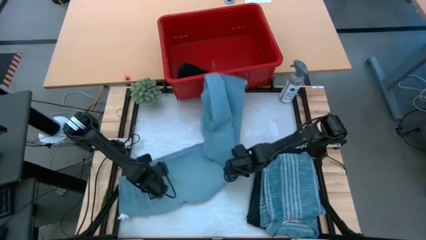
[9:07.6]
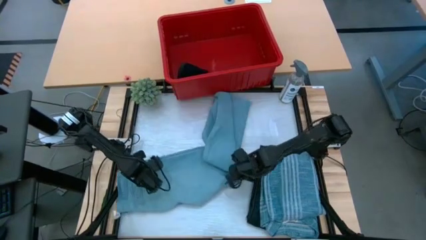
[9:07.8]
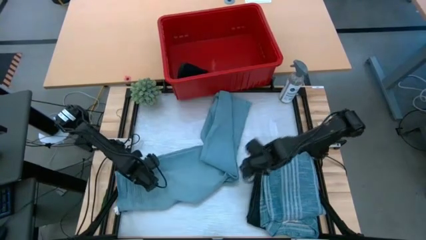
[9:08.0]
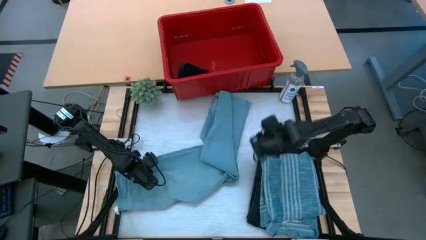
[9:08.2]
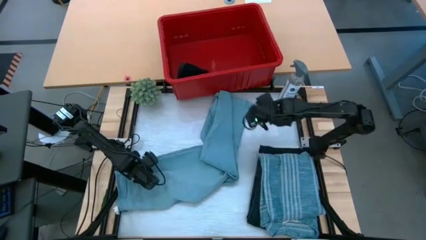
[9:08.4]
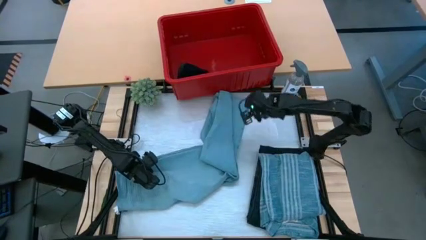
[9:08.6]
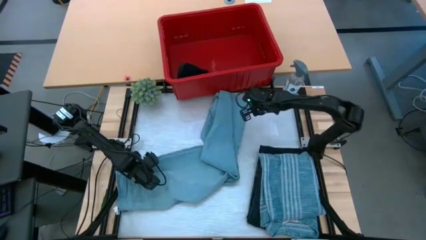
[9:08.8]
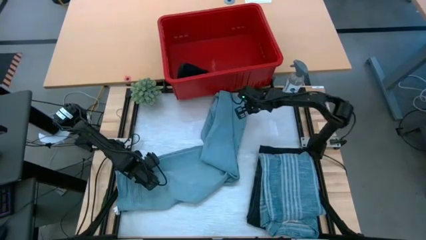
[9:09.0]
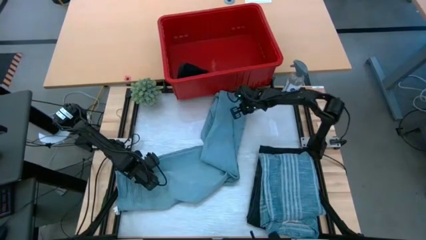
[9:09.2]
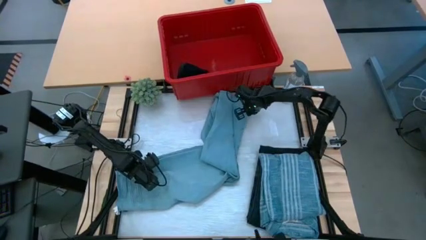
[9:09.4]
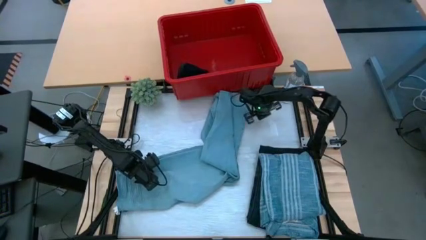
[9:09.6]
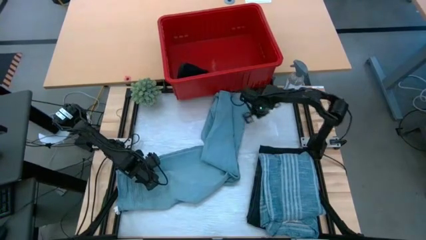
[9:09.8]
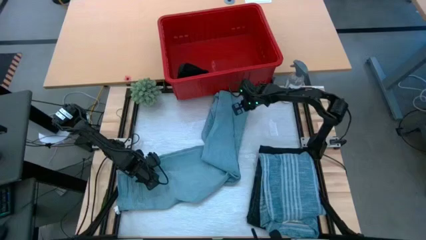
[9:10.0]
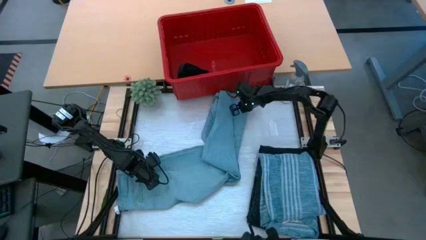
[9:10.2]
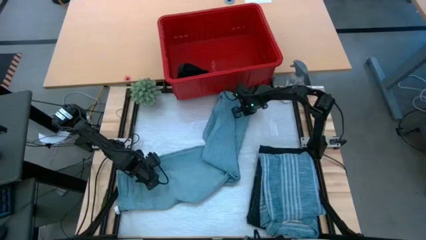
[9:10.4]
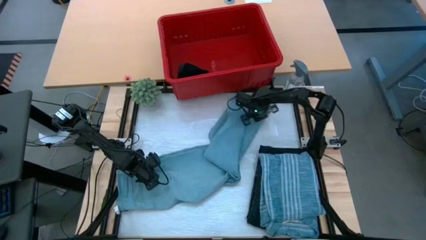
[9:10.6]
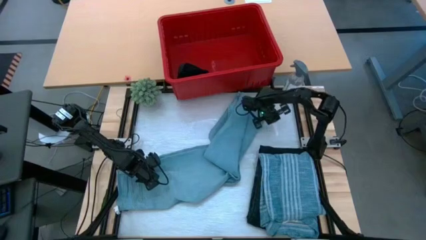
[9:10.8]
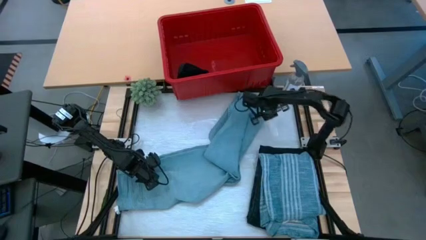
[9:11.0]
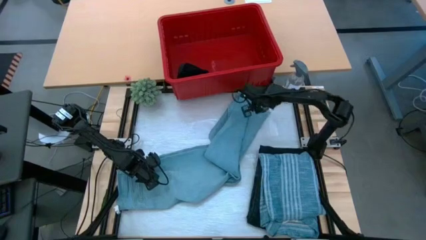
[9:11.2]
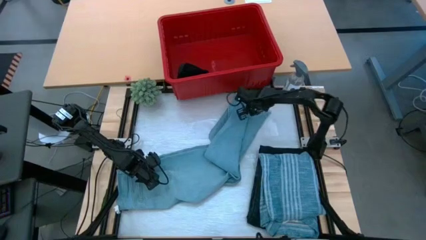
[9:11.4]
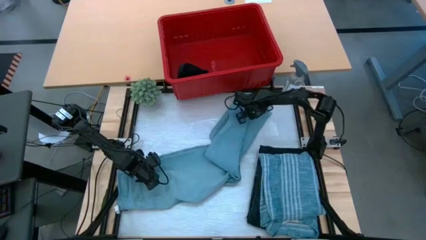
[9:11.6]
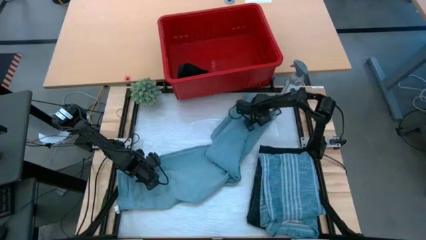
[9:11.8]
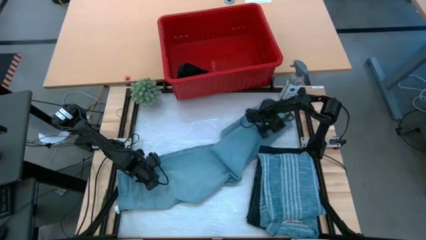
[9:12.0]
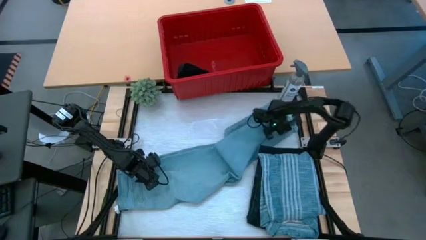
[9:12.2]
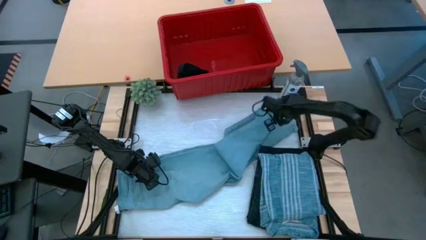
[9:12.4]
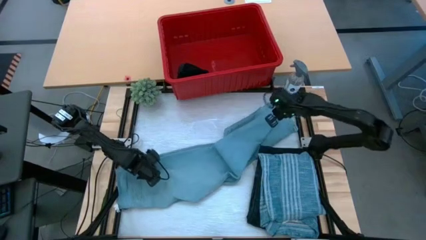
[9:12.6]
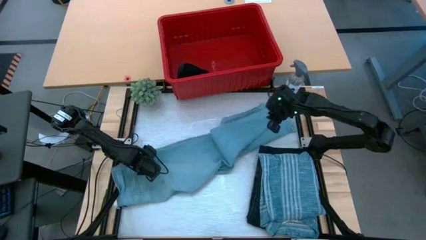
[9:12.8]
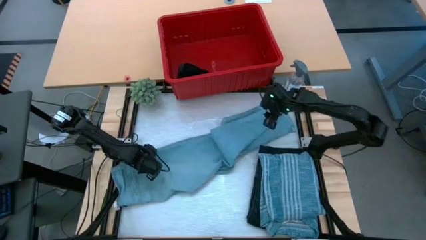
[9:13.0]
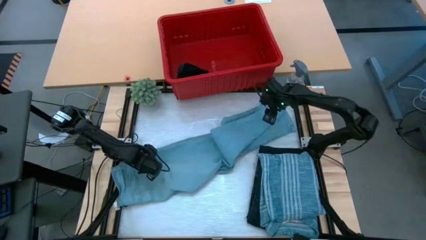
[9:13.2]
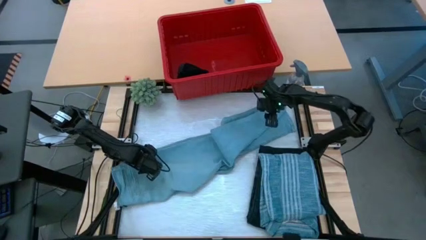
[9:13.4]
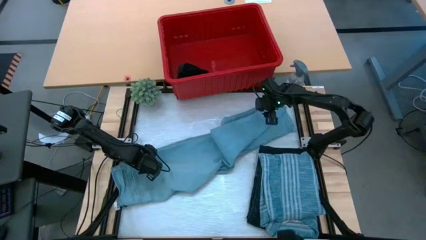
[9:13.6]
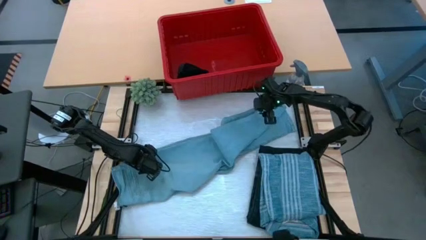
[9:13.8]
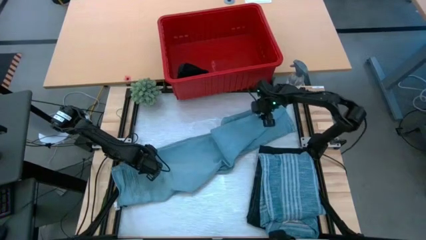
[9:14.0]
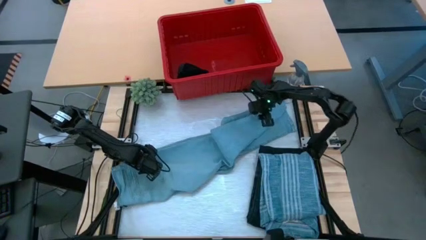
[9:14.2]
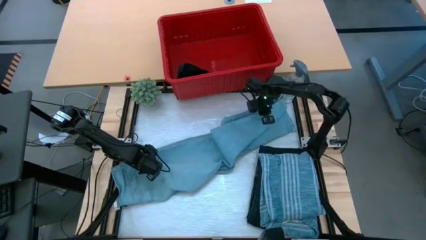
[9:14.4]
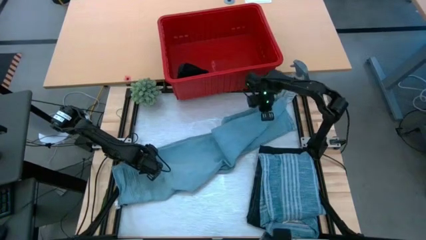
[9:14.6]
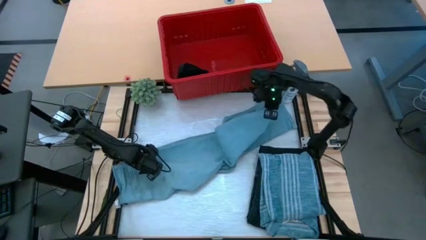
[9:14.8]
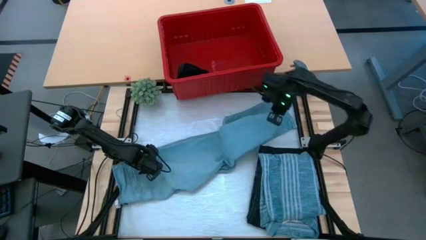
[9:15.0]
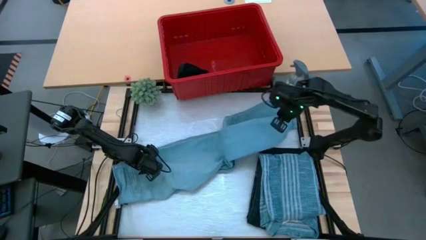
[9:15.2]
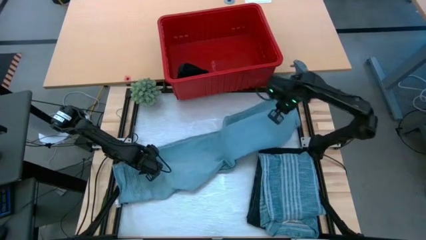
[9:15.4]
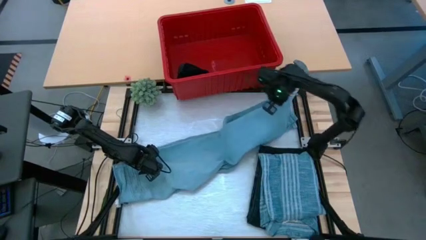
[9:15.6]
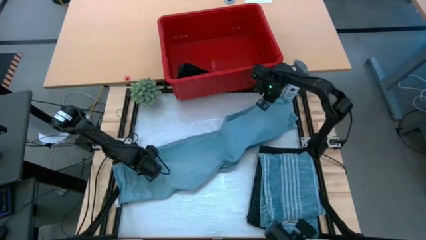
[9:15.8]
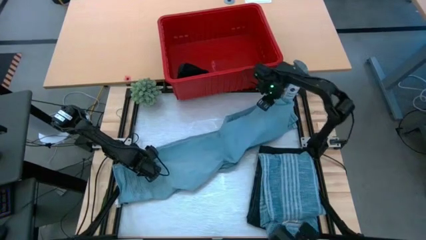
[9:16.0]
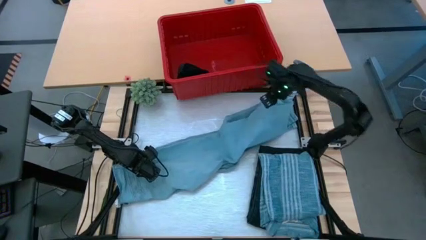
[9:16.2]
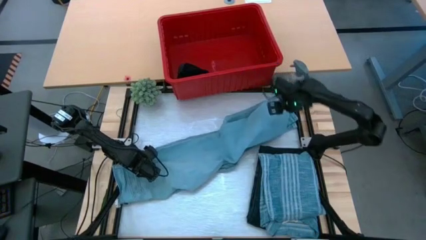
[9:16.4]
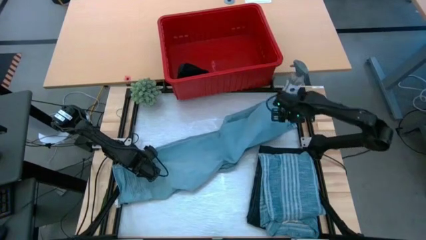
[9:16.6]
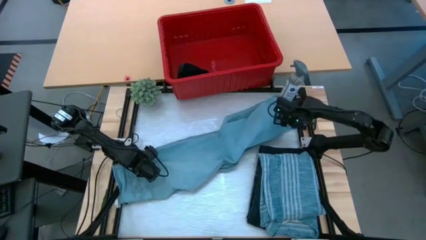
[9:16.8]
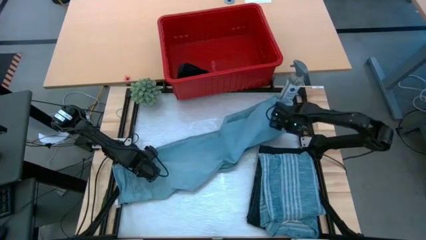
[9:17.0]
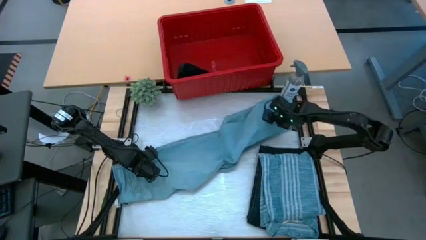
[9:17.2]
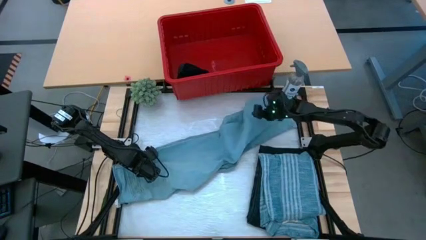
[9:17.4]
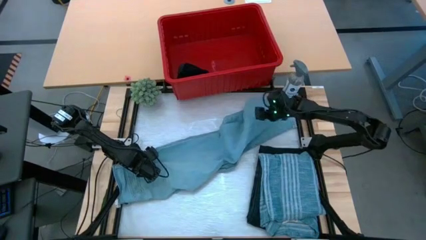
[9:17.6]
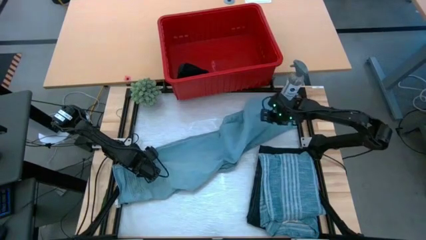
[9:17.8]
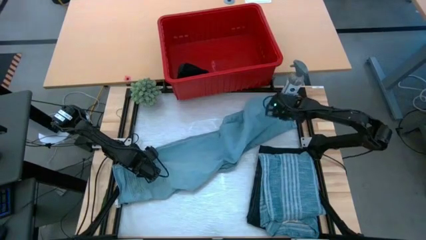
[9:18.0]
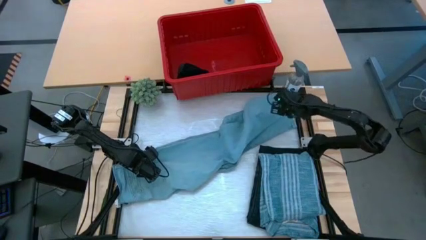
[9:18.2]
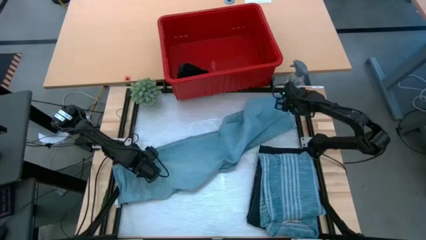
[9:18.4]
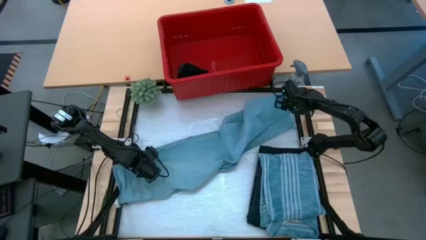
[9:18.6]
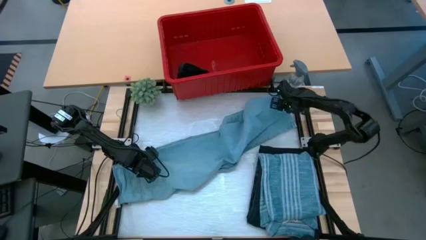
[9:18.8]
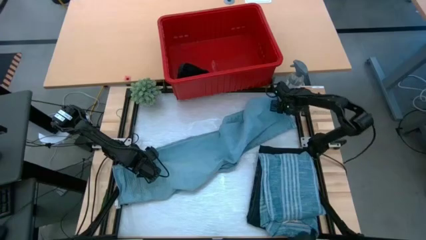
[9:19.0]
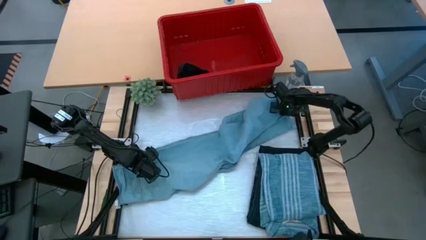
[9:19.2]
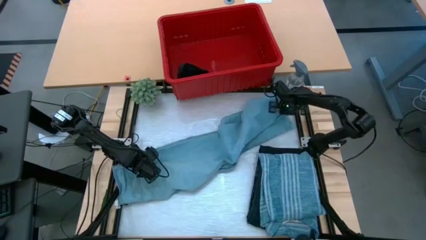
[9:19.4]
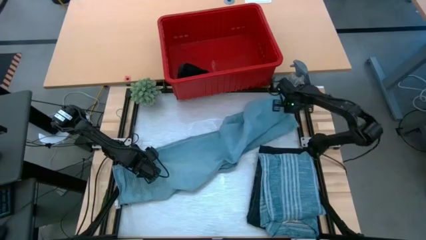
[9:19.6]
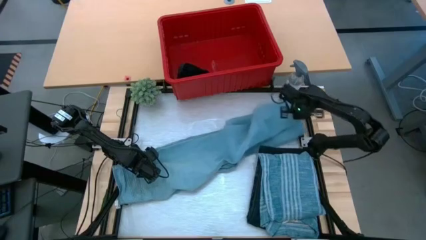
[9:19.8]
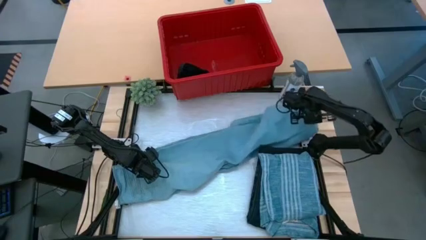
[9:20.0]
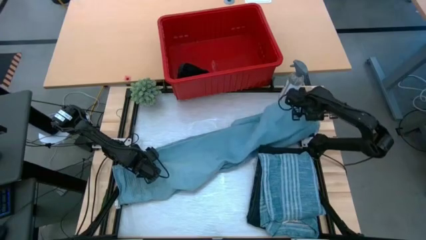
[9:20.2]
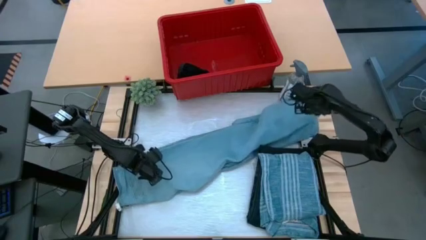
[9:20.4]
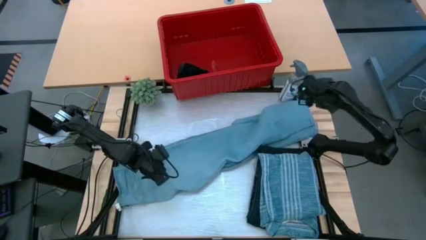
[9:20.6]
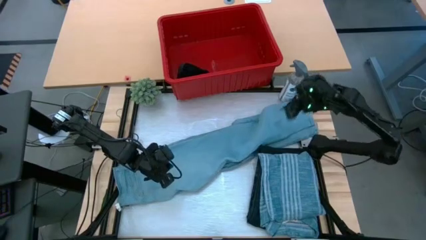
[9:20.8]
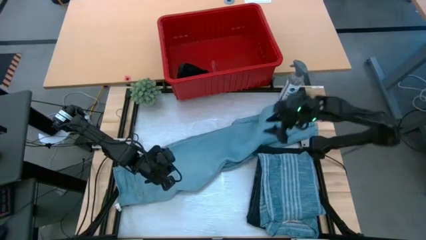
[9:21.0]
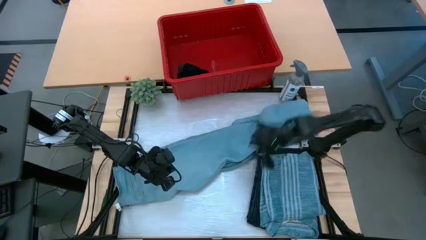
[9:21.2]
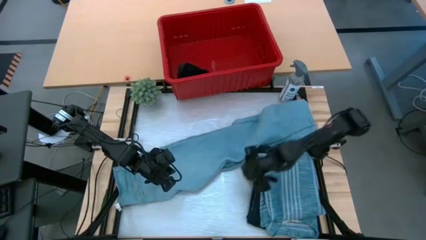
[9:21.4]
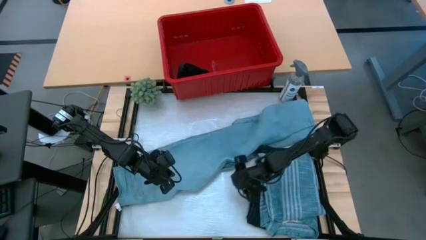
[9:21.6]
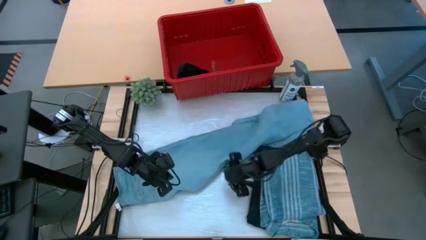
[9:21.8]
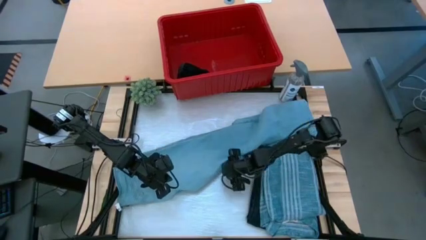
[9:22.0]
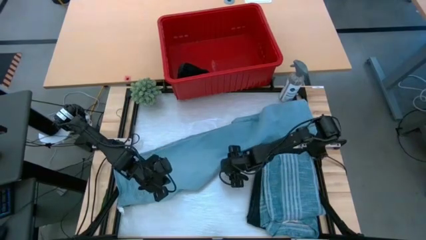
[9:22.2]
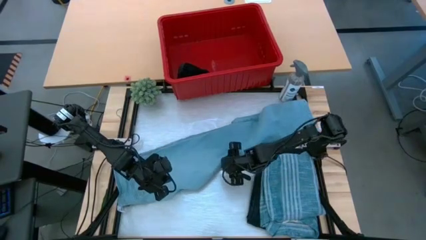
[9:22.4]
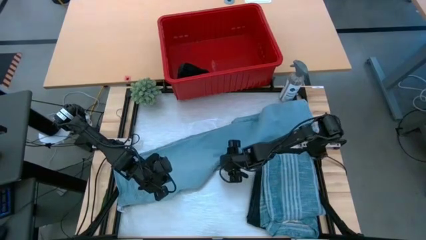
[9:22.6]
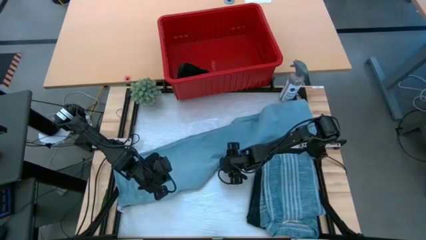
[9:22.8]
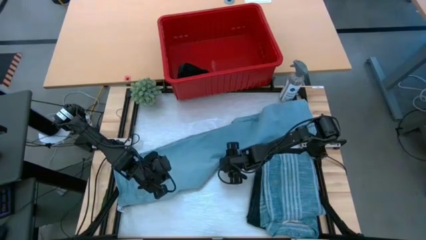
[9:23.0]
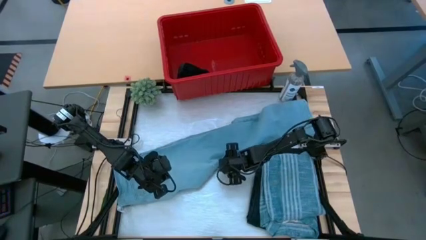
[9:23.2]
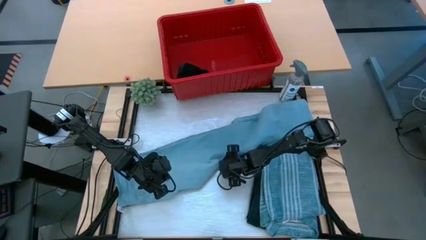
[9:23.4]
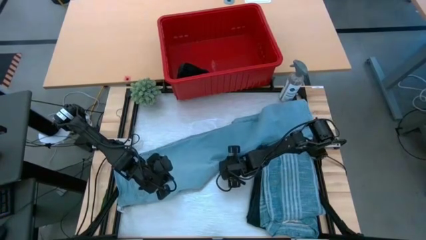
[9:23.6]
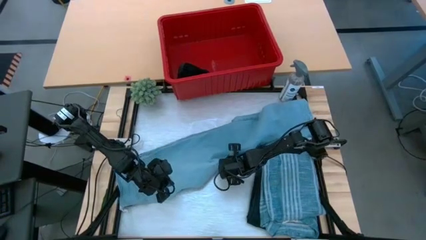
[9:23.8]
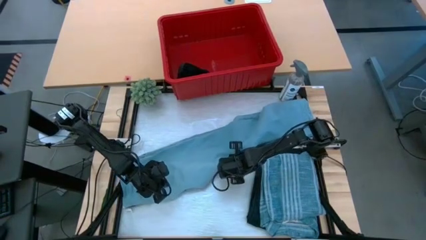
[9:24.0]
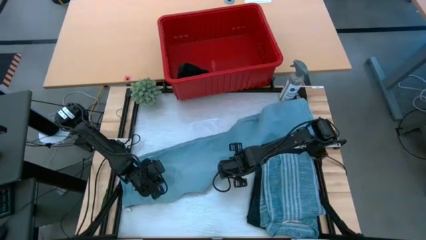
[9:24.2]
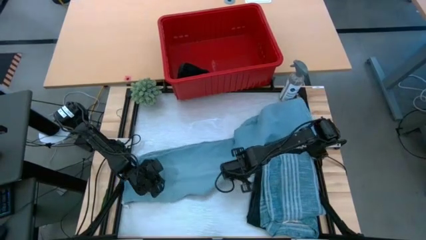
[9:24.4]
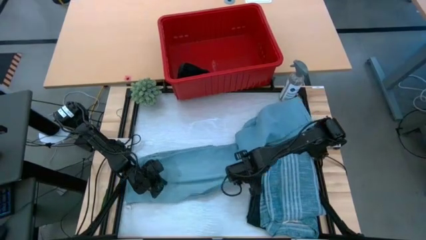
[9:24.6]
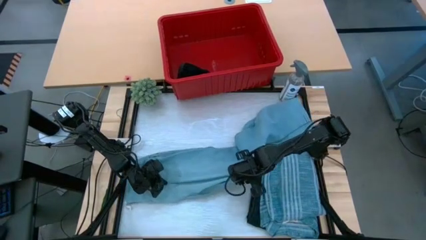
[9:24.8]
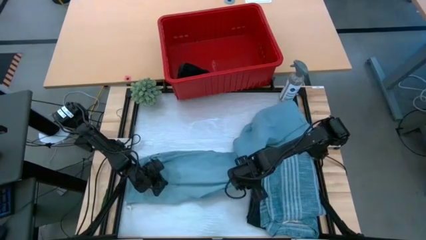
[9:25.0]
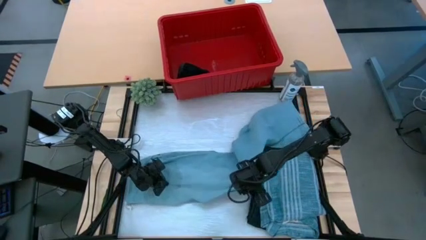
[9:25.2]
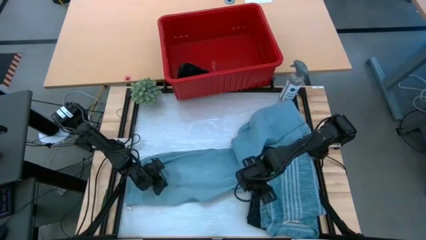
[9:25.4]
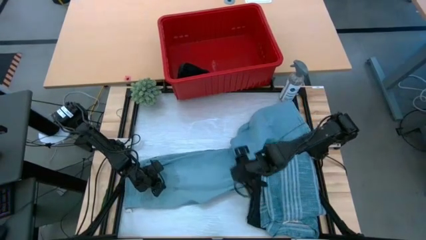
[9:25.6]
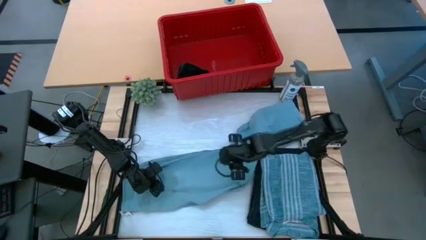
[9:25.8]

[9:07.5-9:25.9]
Task: Fold Laundry from Bin
Fold the light blue denim pants
